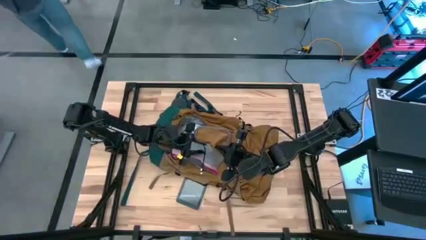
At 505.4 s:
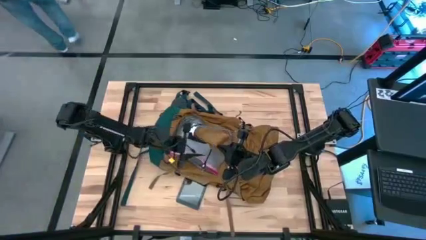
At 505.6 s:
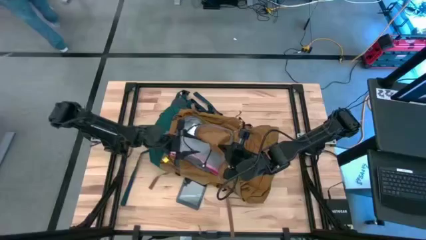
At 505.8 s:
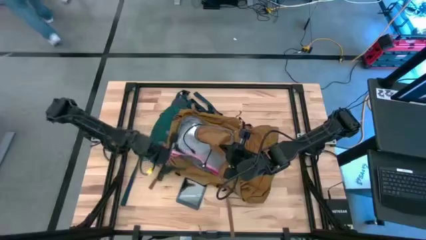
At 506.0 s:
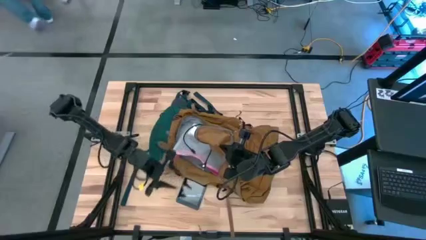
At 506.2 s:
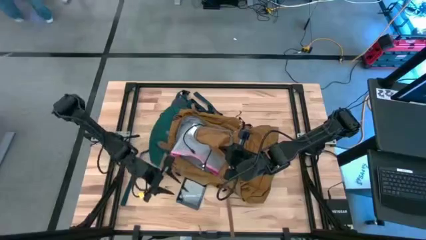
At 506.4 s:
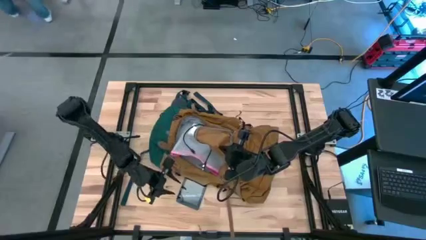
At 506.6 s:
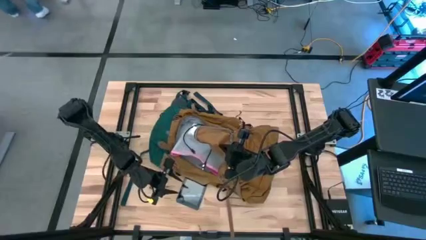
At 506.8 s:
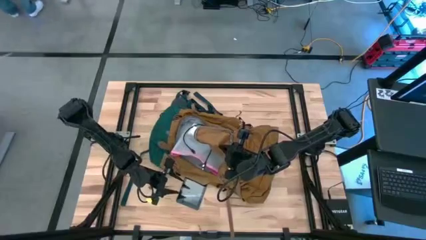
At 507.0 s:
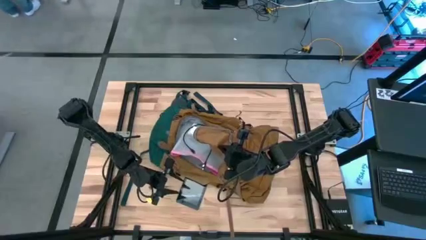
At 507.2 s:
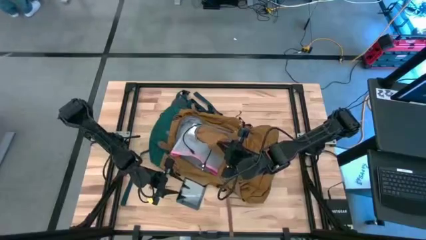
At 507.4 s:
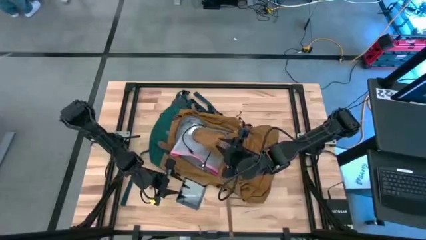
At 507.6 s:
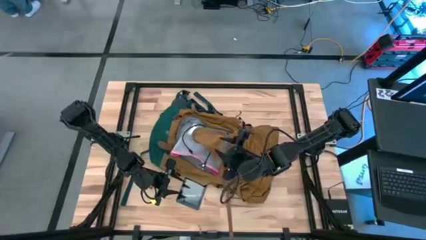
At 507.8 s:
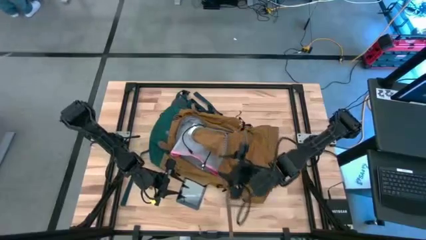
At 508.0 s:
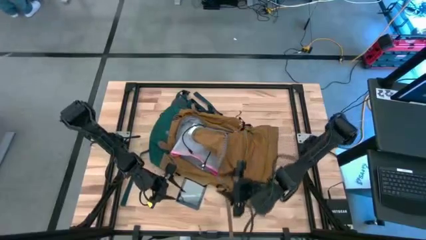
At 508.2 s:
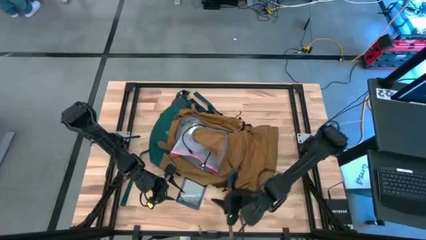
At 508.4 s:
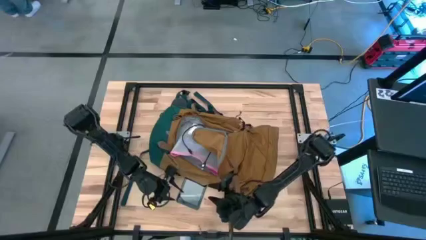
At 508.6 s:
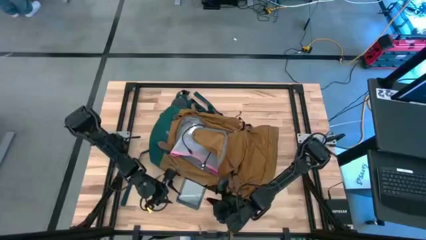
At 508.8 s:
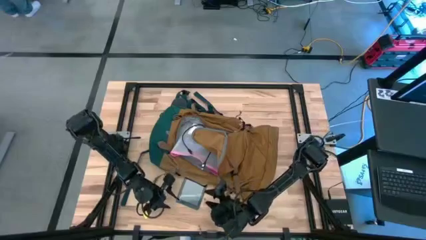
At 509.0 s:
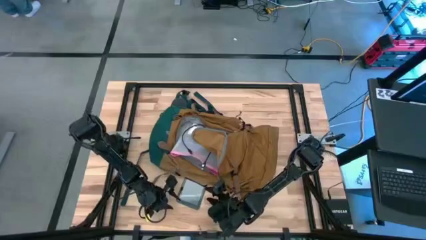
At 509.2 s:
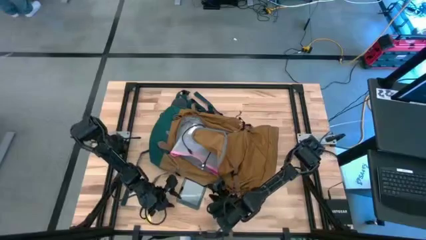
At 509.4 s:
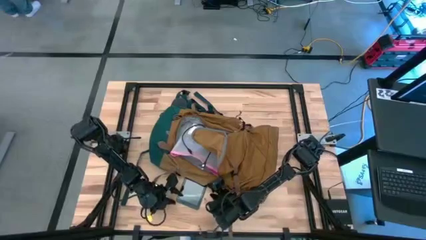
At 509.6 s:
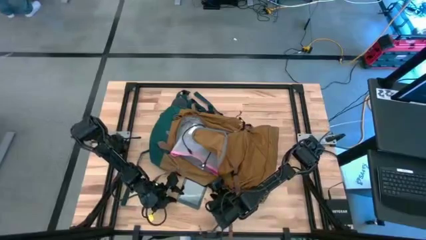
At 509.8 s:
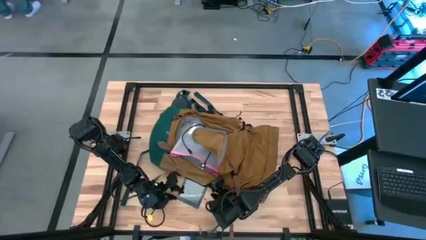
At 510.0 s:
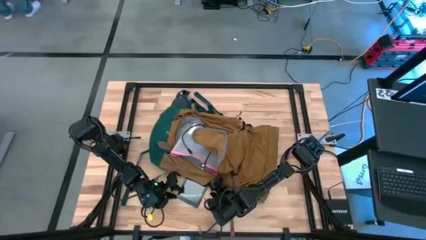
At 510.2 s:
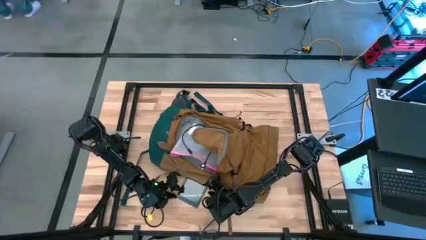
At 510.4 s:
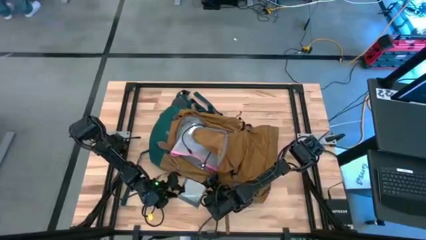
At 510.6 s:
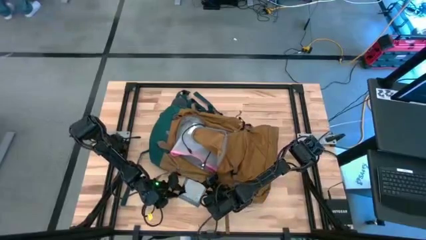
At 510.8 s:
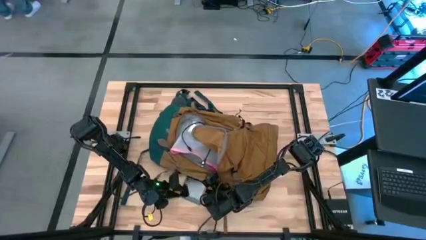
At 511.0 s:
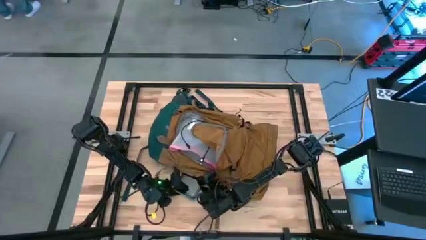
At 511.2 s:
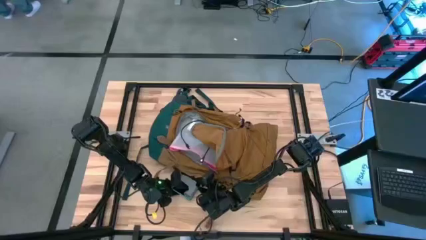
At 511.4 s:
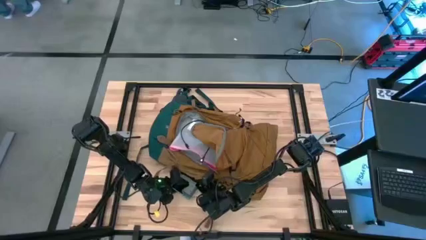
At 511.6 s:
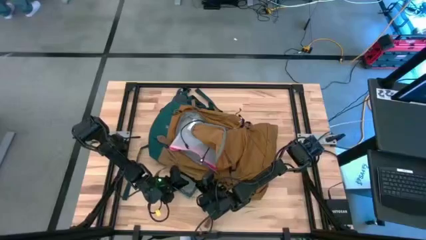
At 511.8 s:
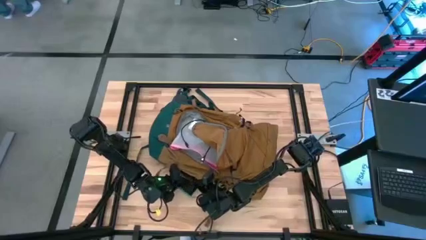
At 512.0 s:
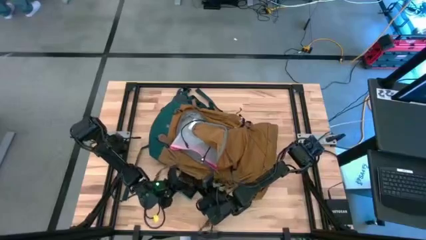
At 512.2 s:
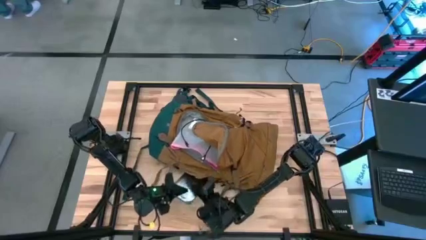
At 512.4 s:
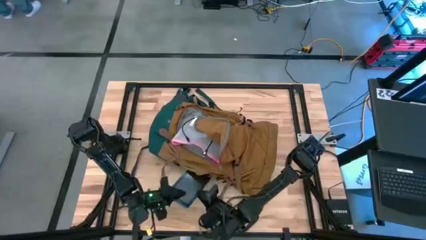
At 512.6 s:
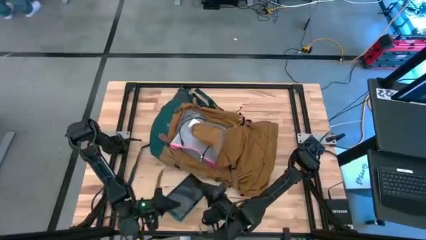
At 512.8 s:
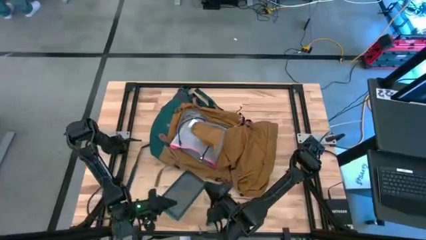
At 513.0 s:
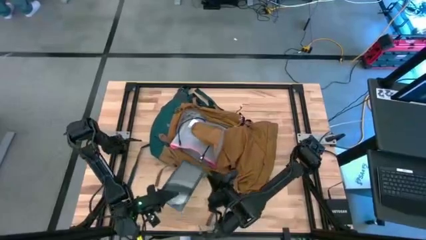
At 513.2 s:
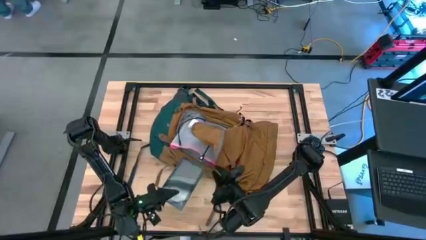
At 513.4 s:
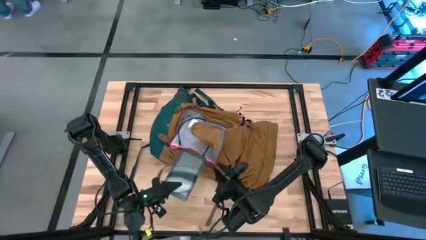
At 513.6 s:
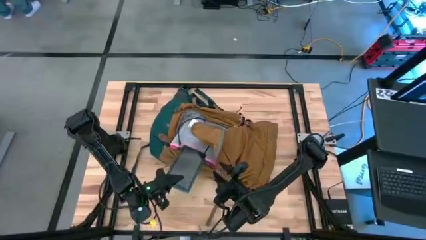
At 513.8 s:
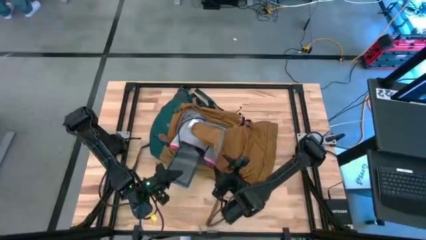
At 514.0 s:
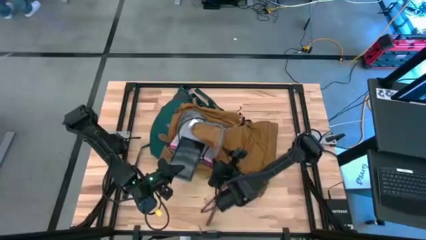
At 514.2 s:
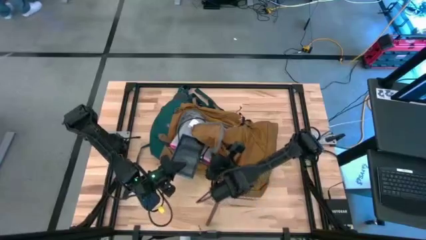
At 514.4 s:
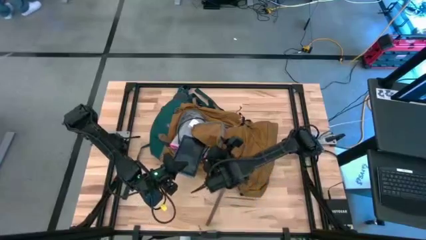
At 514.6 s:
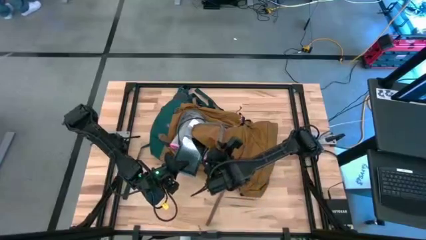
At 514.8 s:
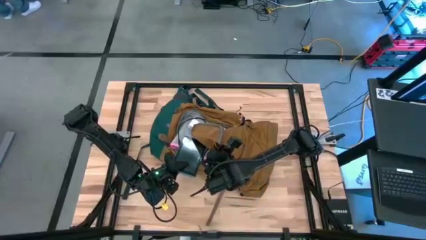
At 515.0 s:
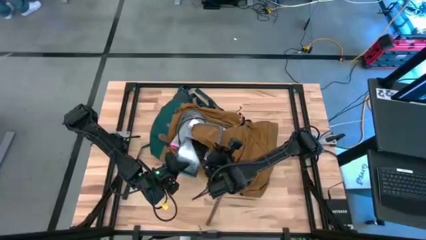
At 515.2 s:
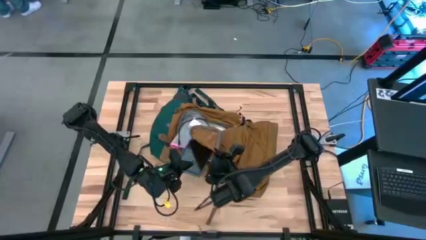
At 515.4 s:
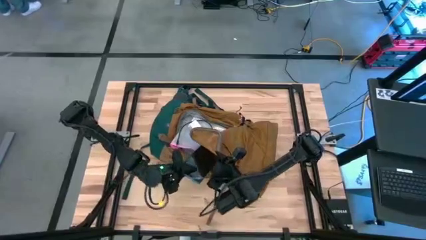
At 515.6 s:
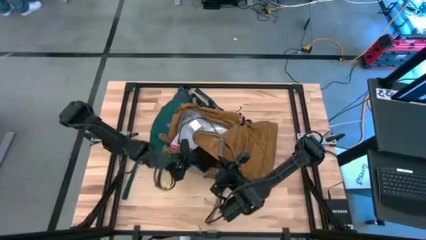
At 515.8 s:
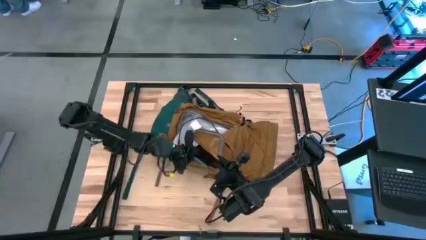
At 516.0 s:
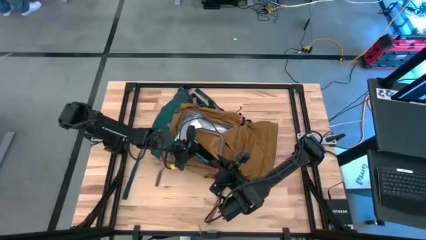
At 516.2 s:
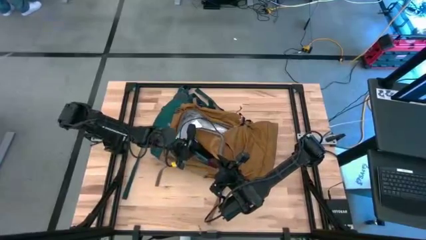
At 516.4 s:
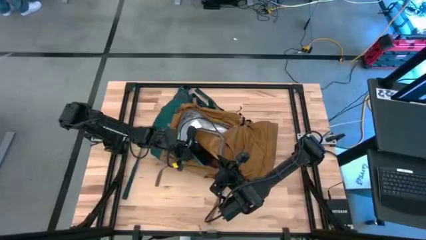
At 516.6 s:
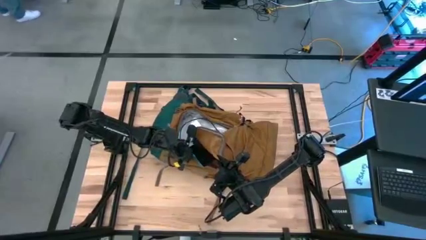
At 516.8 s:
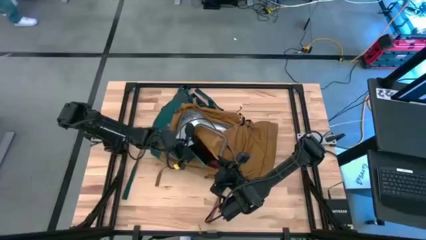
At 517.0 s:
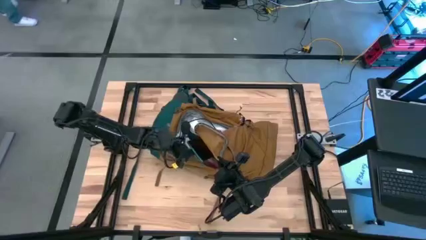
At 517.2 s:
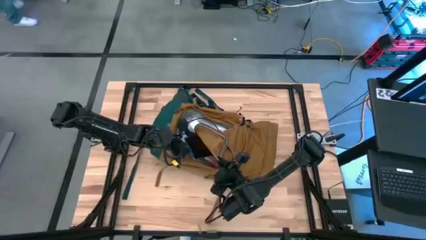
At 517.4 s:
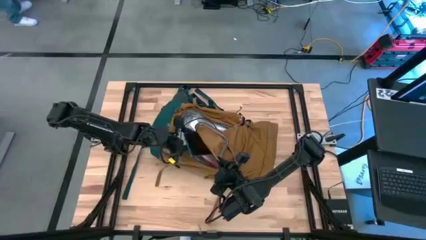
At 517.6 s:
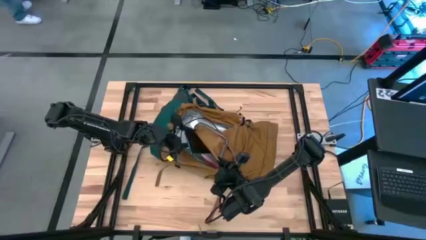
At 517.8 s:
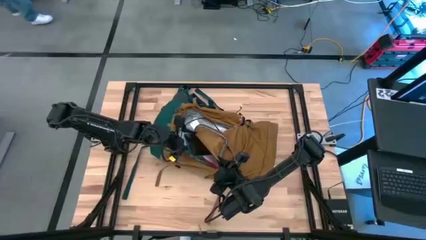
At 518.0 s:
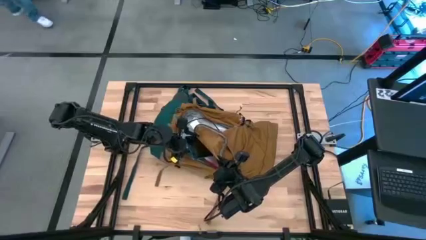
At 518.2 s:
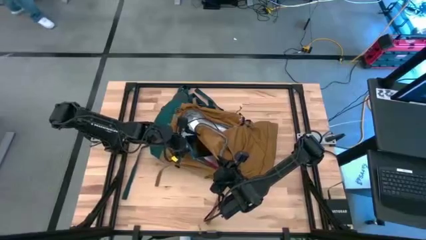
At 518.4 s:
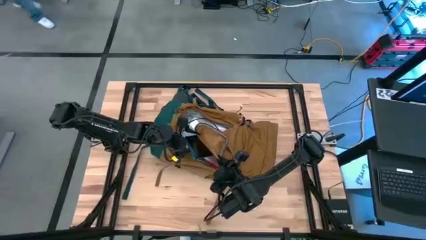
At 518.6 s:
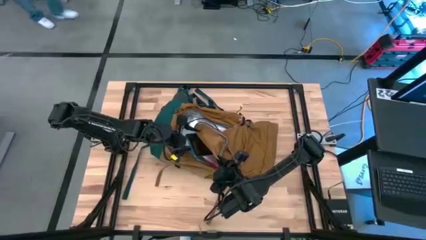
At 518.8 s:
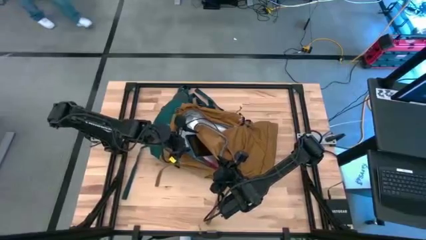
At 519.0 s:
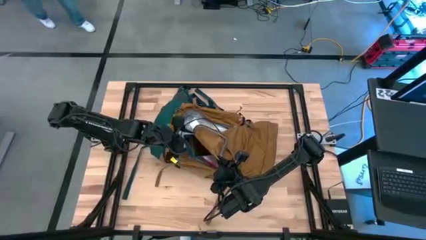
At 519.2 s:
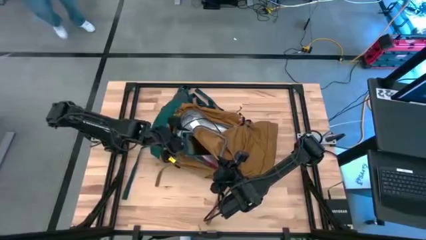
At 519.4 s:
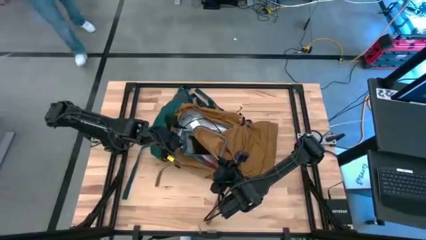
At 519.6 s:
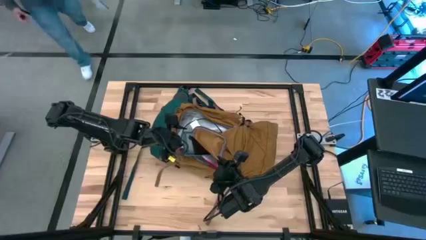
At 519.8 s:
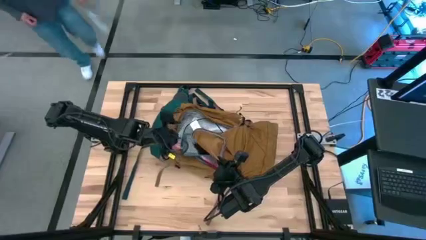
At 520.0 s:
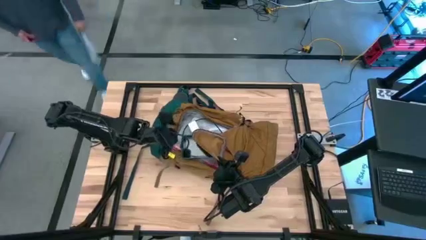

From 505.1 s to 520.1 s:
Task: Unpack backpack
Put the blue tablet into the brown backpack

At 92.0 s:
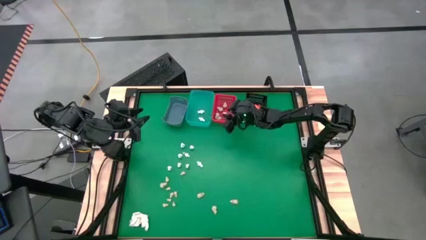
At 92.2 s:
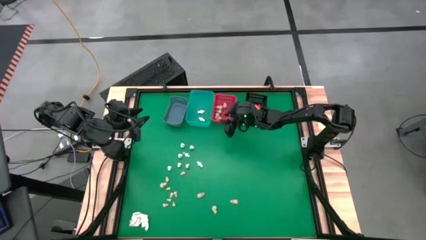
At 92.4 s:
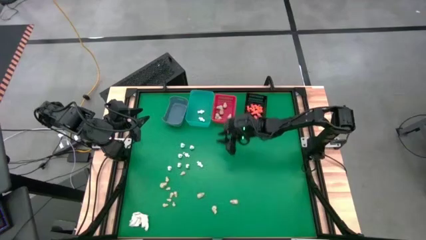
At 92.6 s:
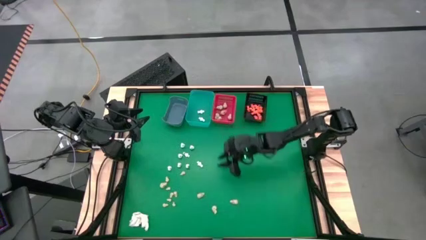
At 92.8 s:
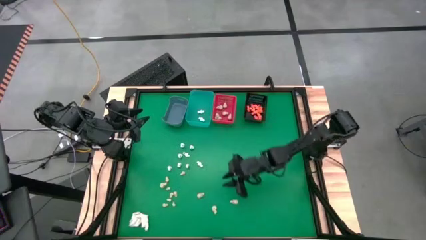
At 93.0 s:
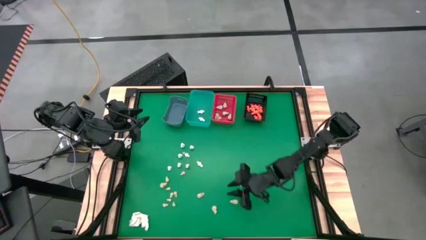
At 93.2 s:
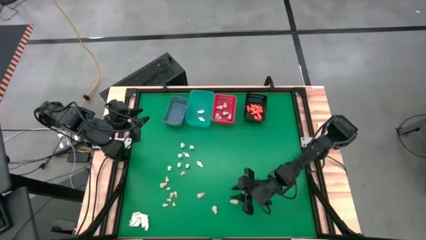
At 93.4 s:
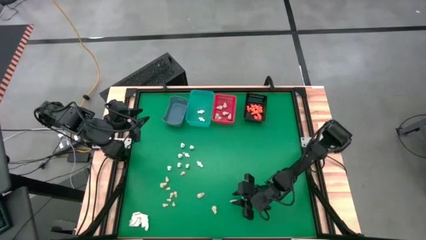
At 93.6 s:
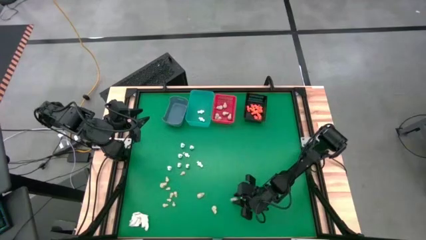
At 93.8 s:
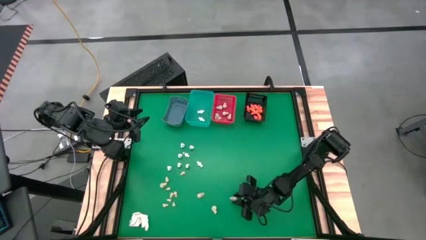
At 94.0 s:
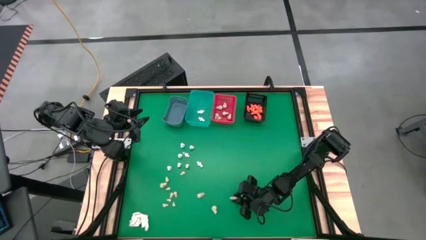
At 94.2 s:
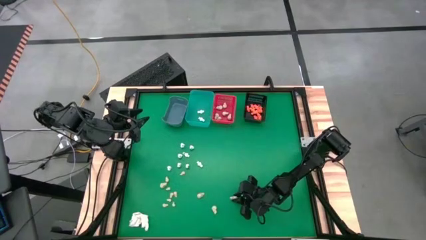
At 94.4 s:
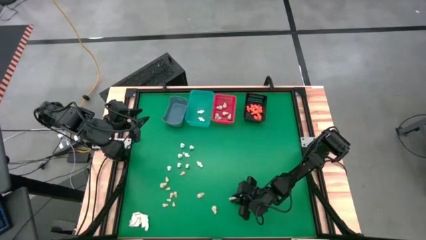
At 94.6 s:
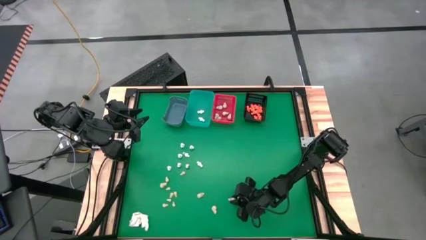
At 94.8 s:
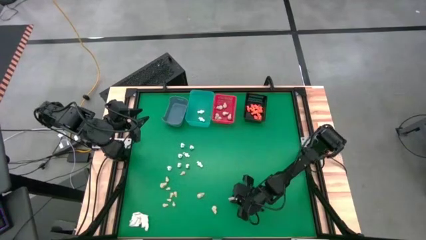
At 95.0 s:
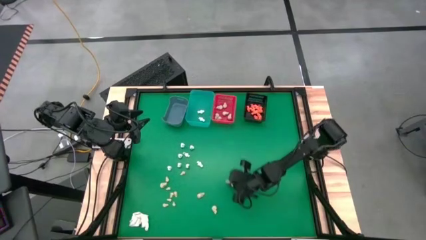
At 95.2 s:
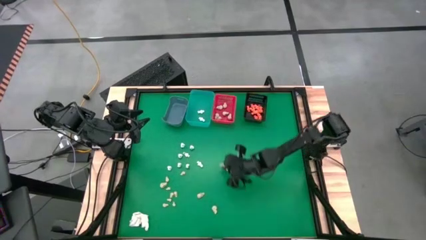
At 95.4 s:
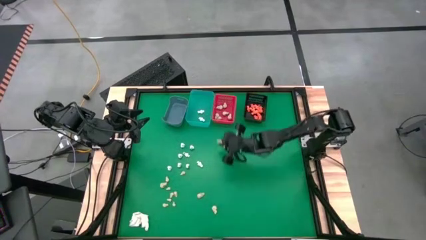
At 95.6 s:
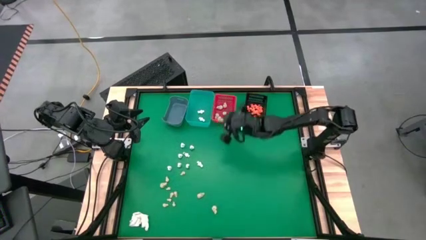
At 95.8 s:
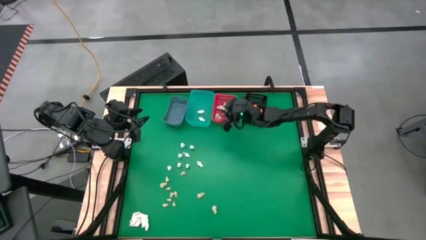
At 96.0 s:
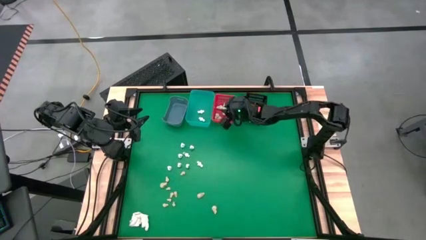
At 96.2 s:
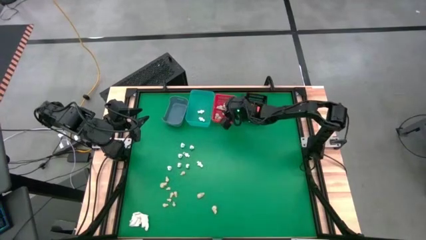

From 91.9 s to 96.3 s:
Task: Sort Halloween decoration
Put the white skull toy into the red bin
